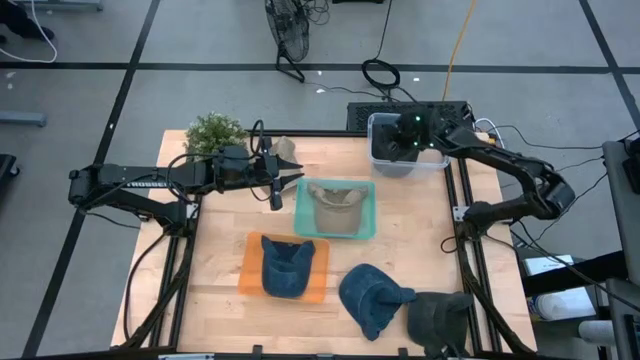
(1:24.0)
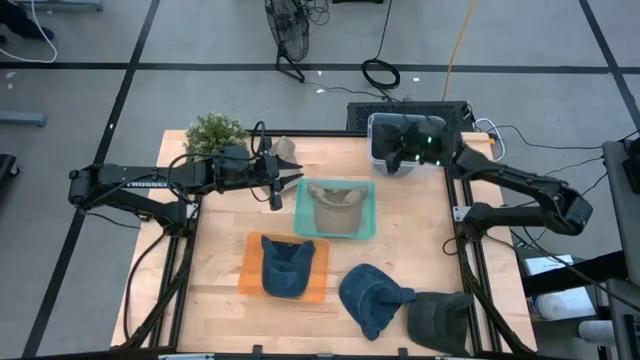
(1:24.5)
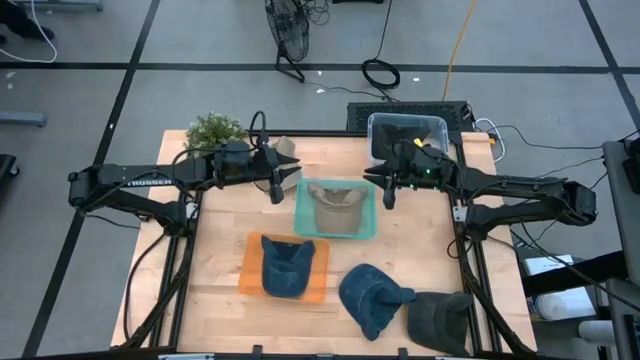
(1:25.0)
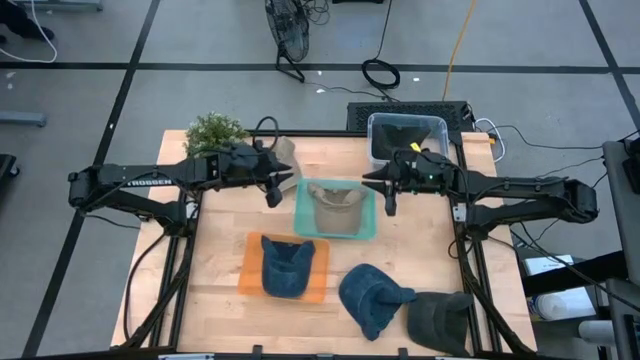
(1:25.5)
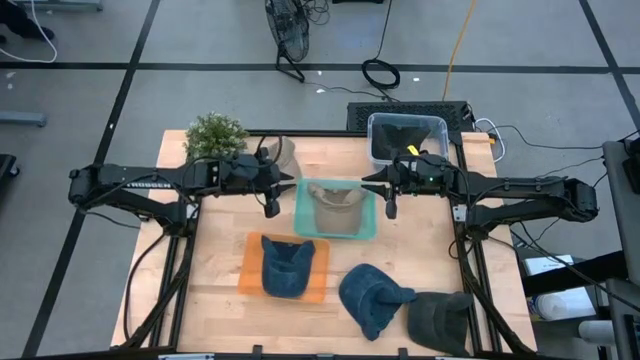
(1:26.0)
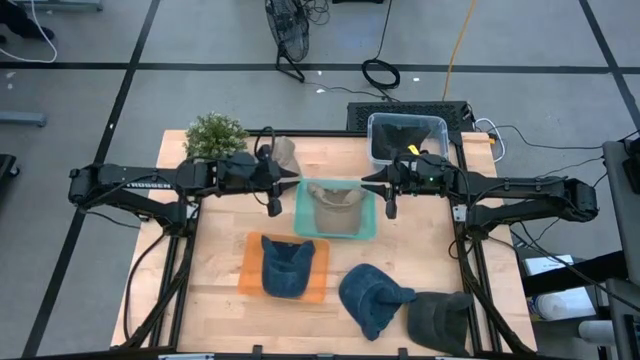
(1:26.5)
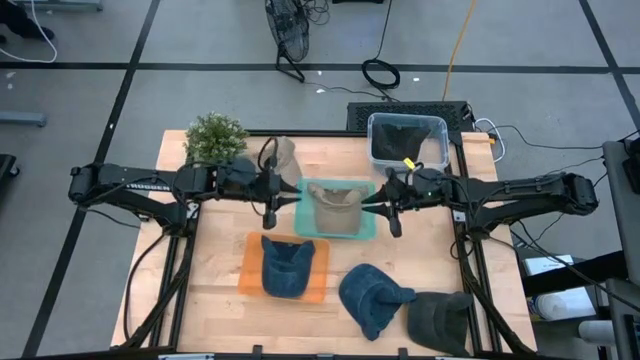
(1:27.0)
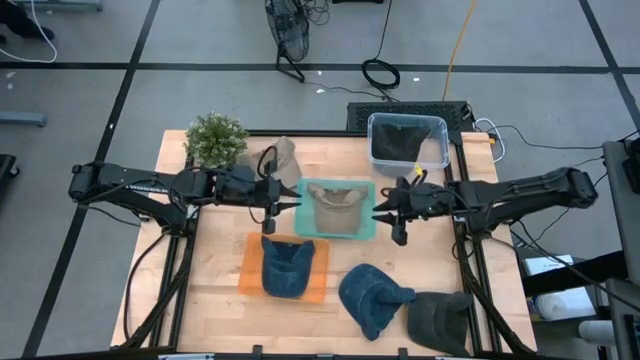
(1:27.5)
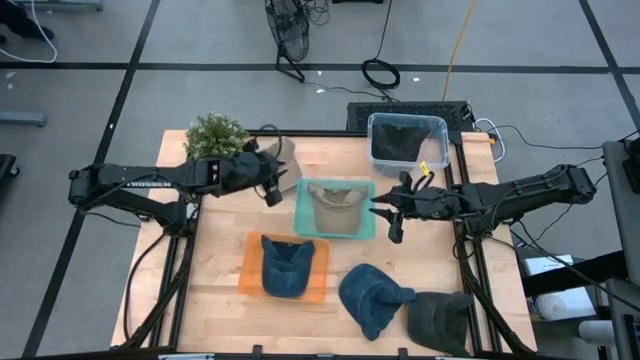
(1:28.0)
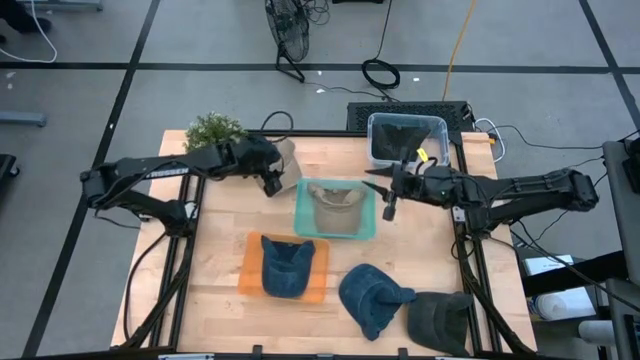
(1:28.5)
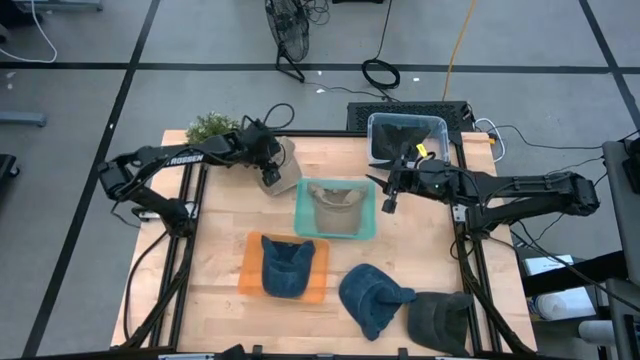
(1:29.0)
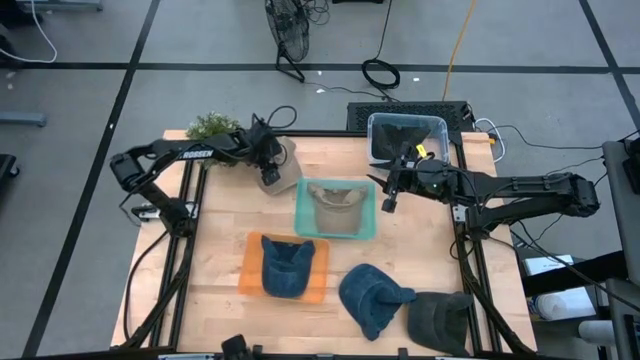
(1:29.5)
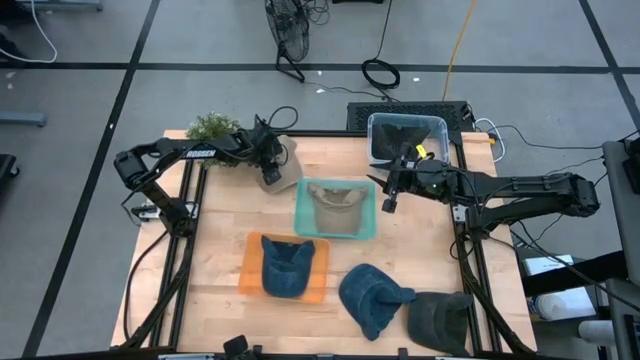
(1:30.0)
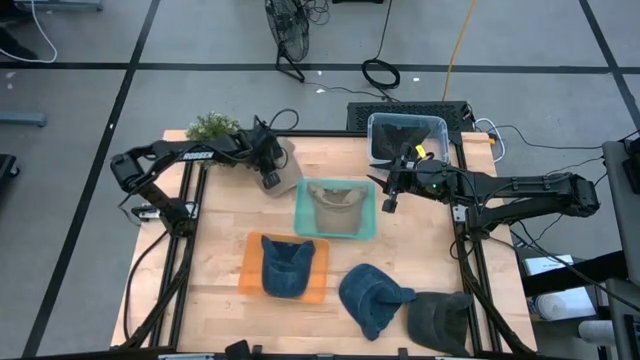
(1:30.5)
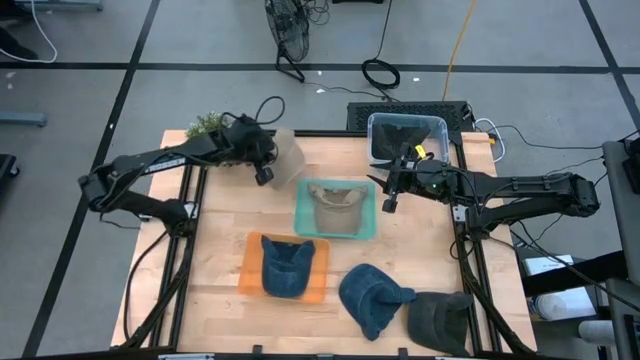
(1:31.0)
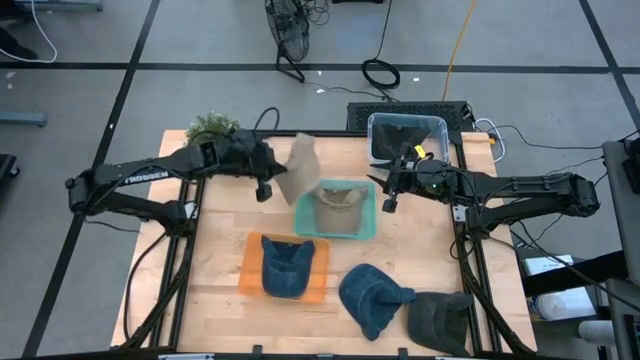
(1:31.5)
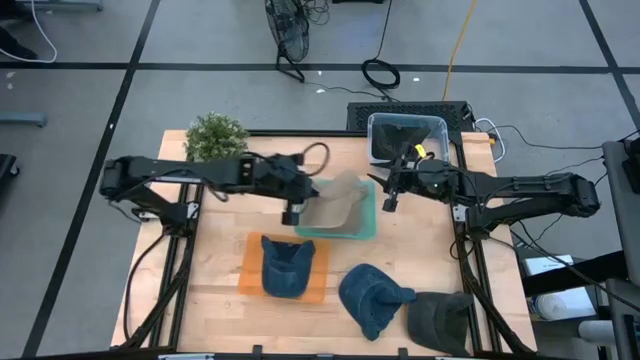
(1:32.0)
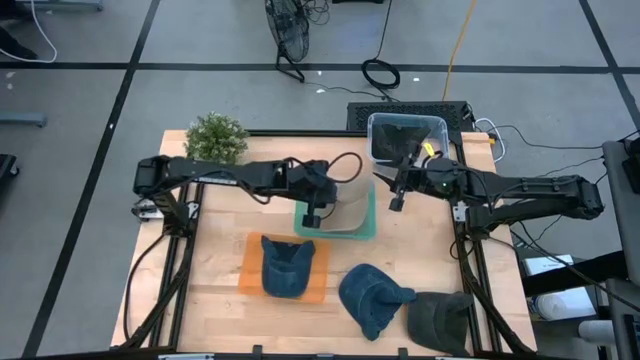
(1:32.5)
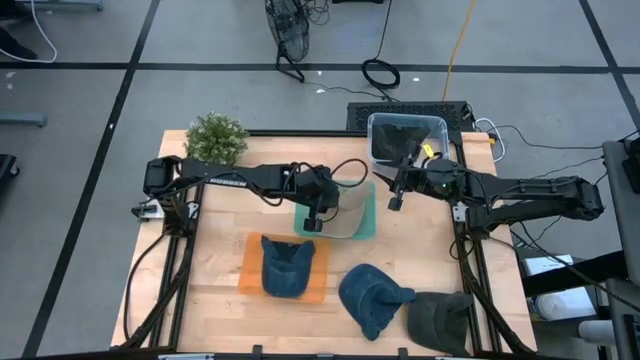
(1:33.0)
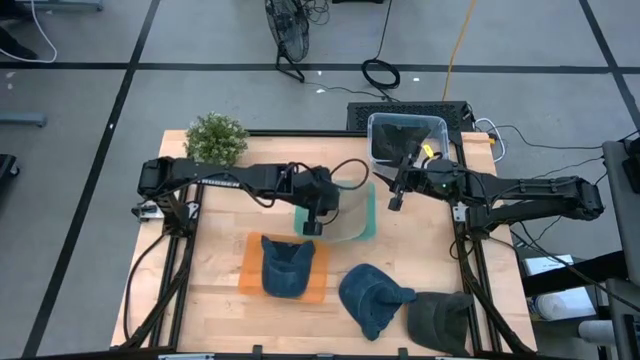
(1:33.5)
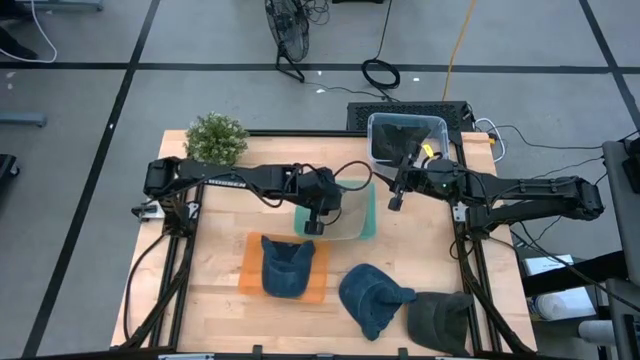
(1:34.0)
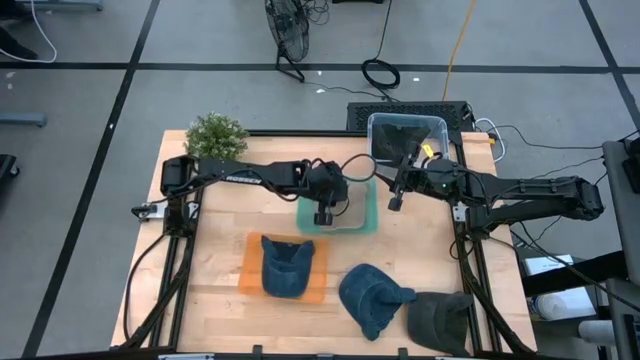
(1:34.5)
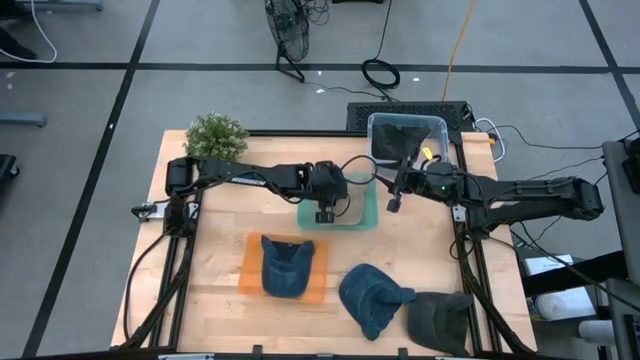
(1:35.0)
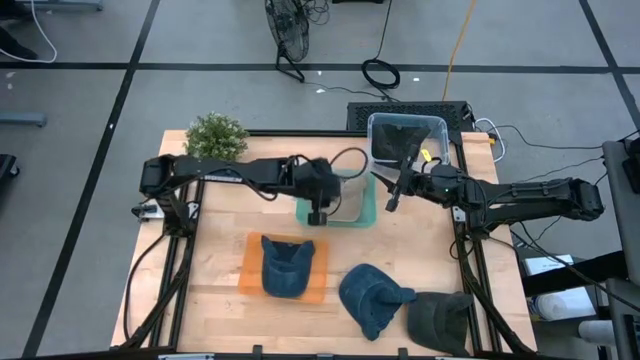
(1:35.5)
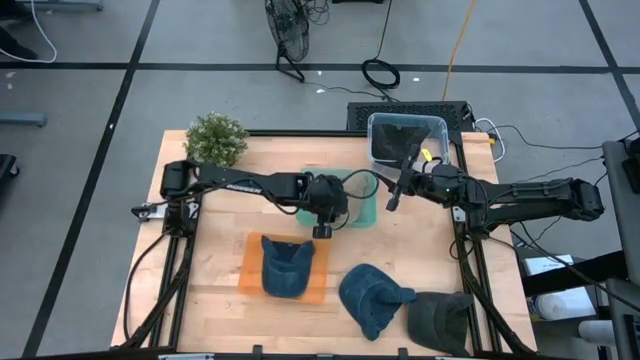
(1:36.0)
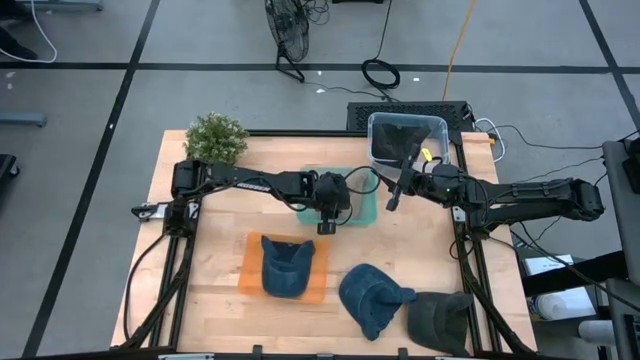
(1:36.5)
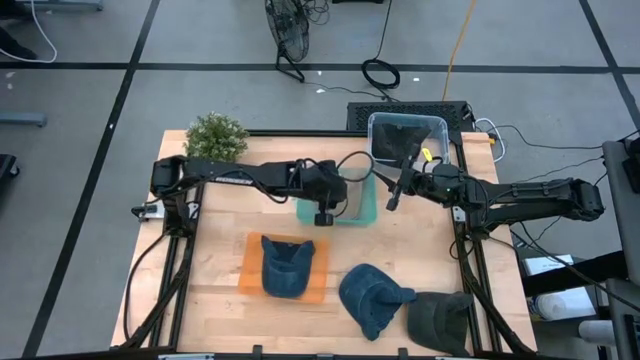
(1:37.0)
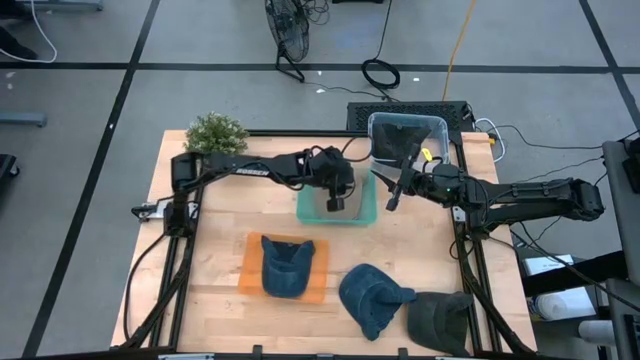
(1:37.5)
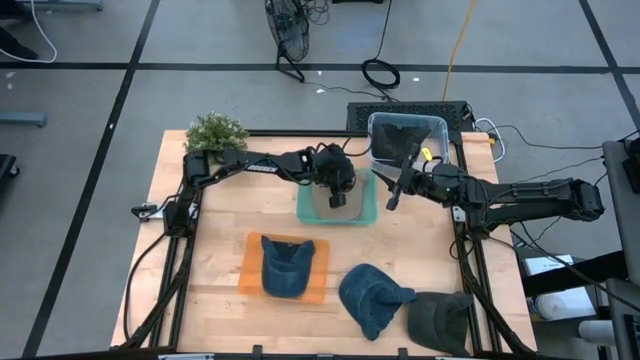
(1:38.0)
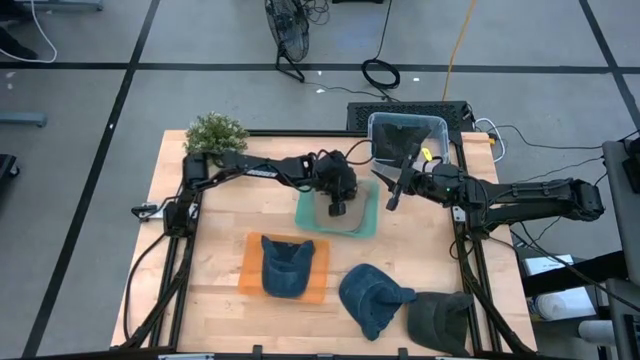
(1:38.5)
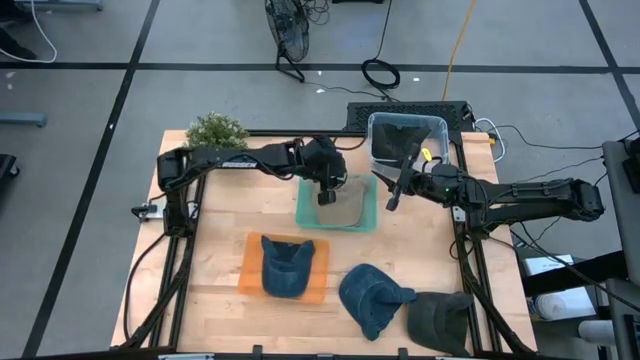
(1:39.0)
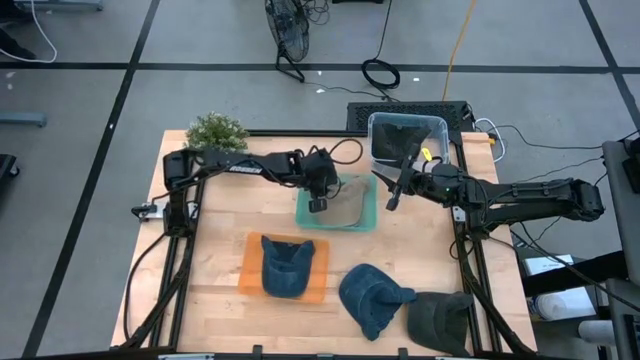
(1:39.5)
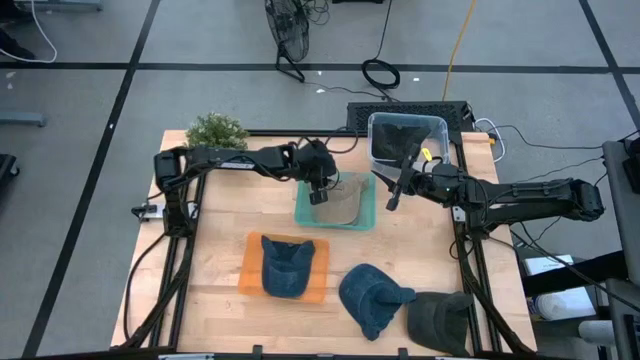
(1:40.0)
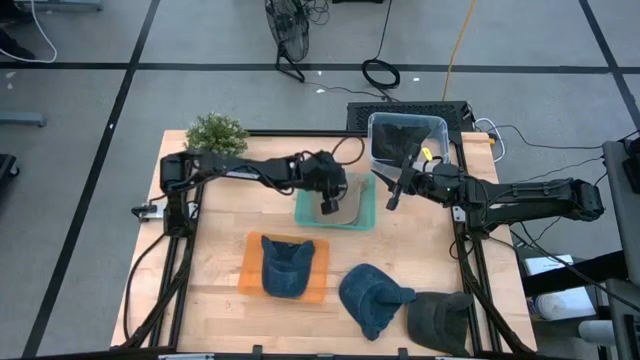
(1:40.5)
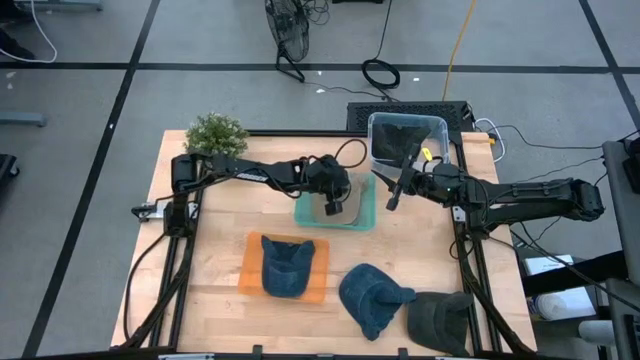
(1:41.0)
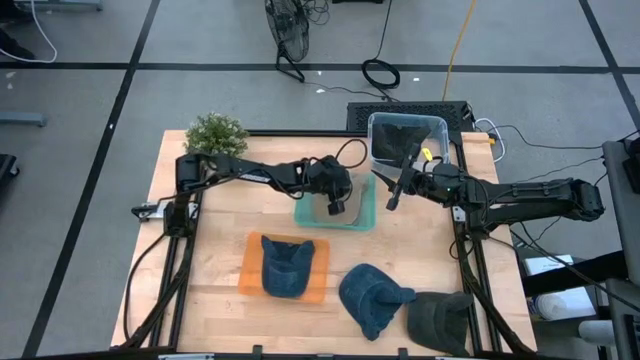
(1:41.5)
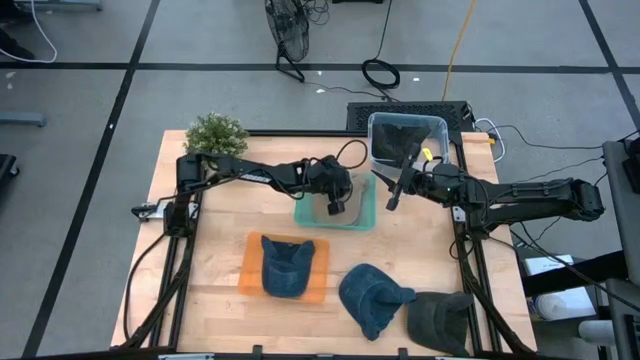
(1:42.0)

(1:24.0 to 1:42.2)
Task: Pick & Place hat
Put the brown cap into the blue bin

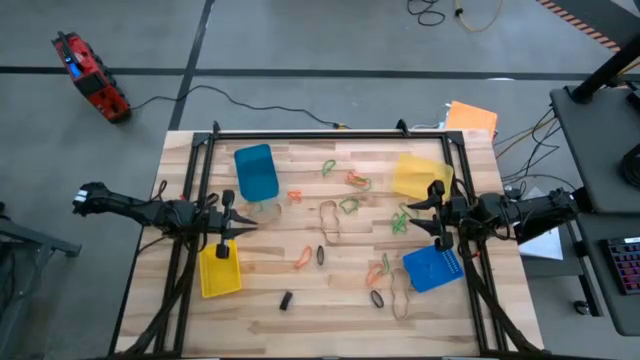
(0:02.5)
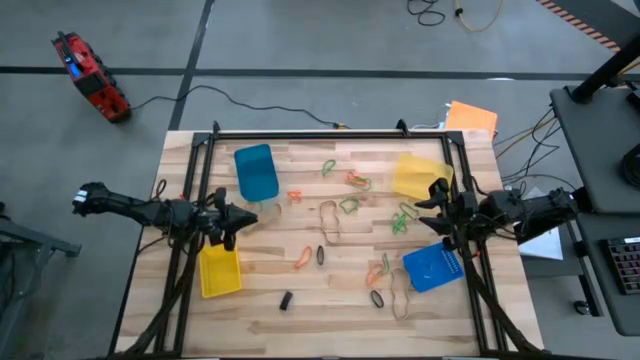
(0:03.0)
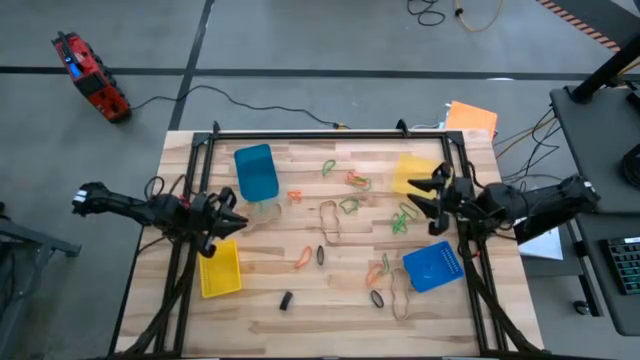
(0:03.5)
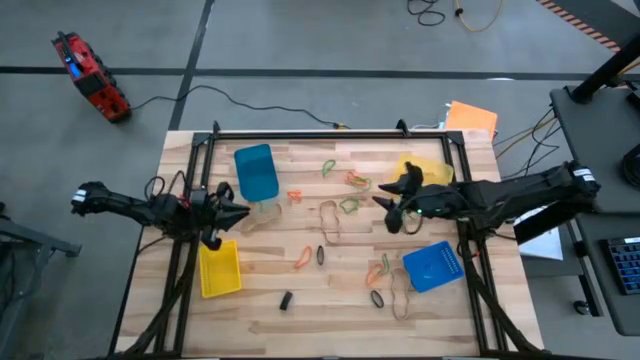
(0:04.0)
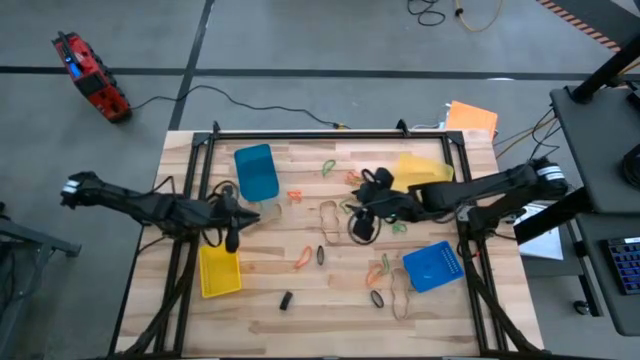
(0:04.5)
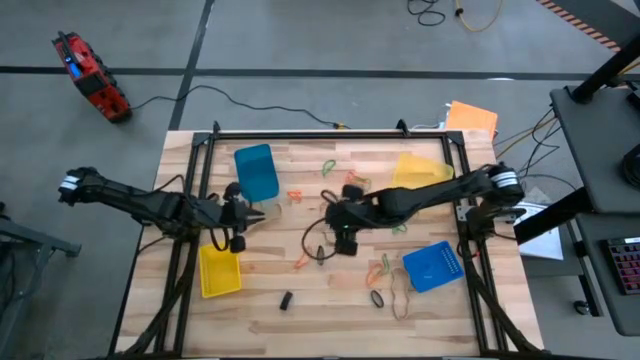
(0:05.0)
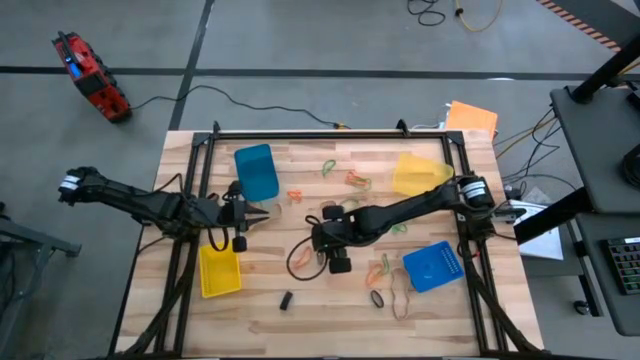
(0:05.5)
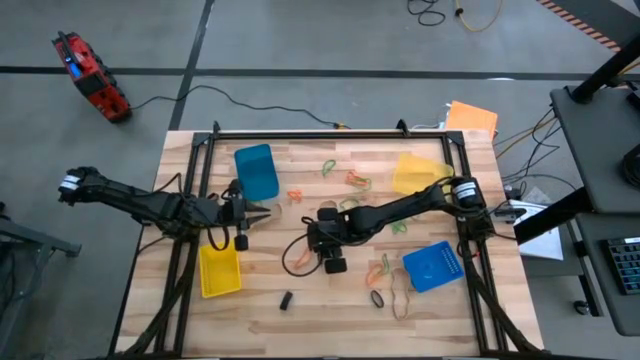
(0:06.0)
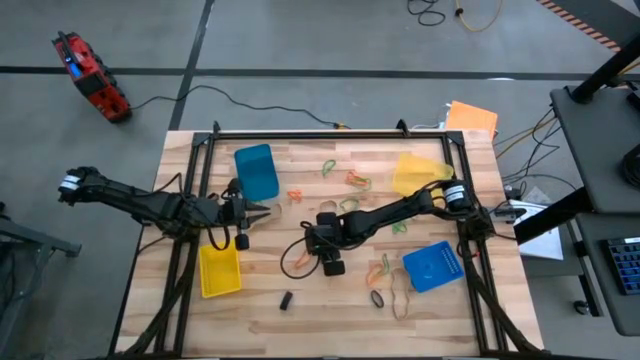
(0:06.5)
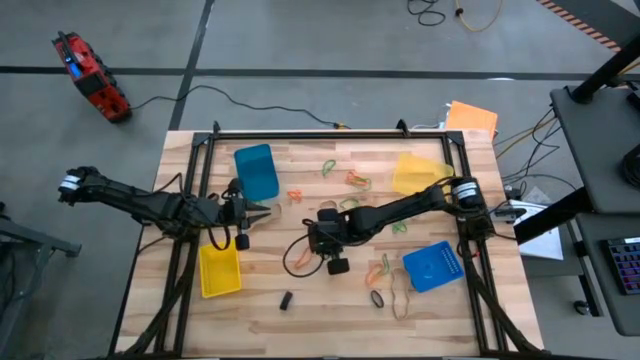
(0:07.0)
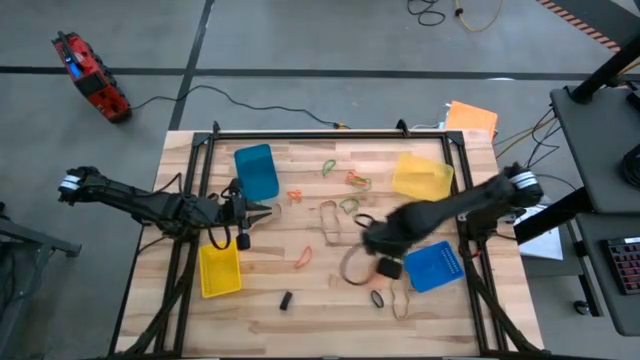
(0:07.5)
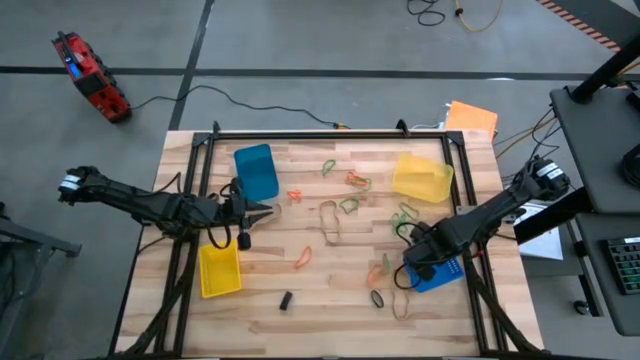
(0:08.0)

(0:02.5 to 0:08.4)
Task: Sort rubber bands into baskets
Put the black rubber band into the blue bin
